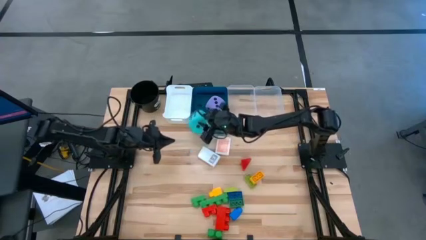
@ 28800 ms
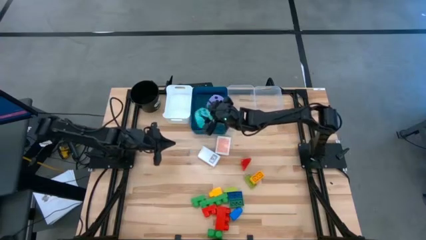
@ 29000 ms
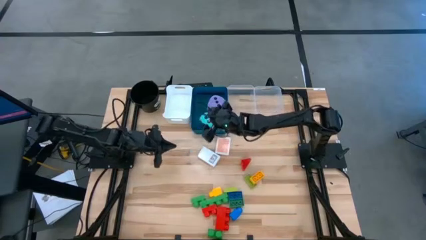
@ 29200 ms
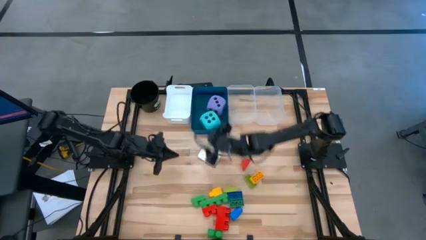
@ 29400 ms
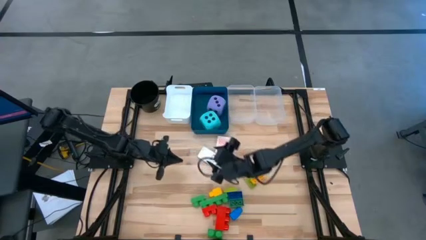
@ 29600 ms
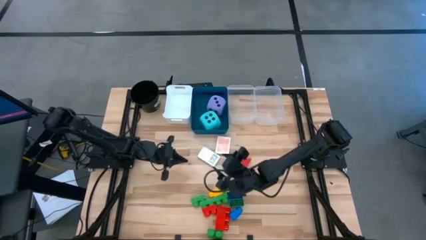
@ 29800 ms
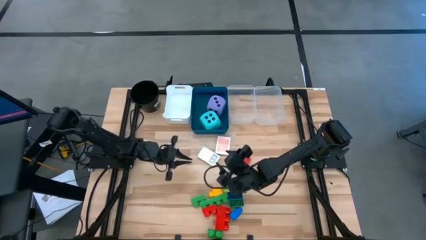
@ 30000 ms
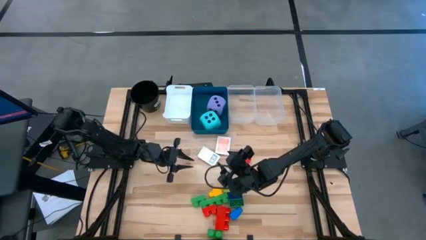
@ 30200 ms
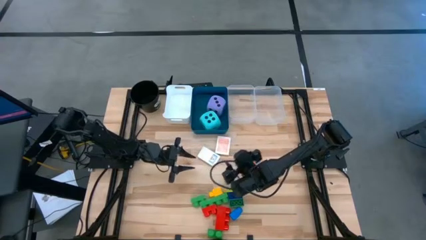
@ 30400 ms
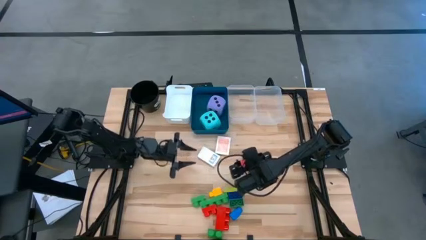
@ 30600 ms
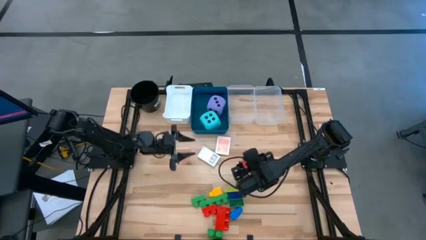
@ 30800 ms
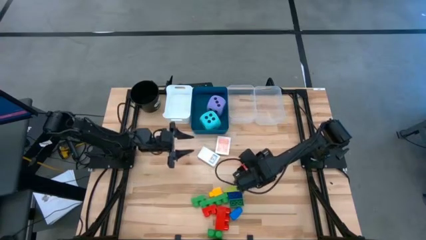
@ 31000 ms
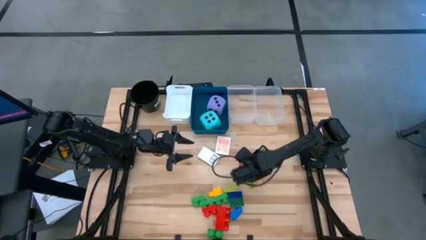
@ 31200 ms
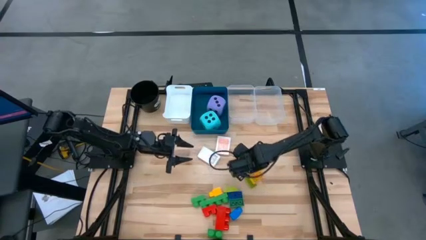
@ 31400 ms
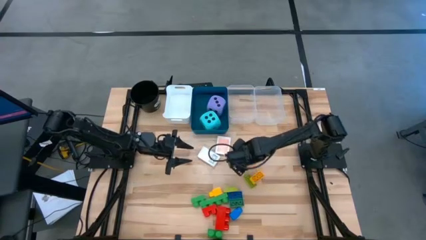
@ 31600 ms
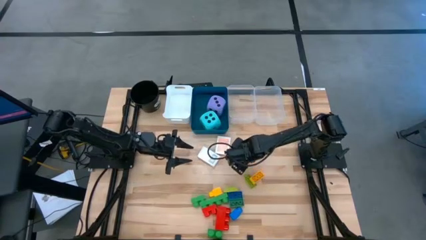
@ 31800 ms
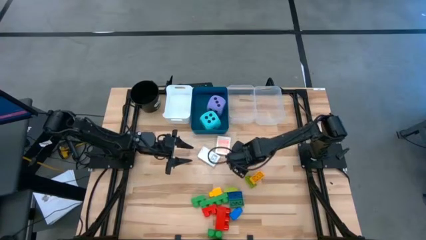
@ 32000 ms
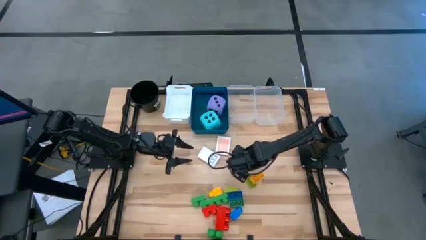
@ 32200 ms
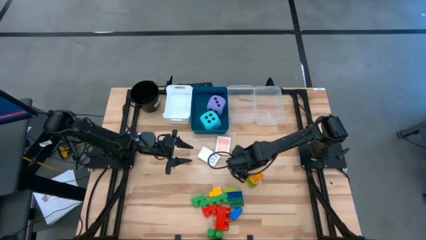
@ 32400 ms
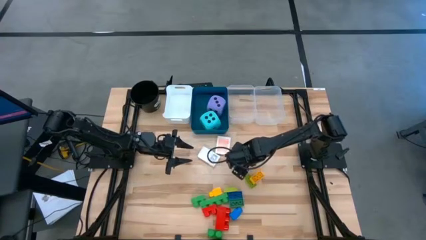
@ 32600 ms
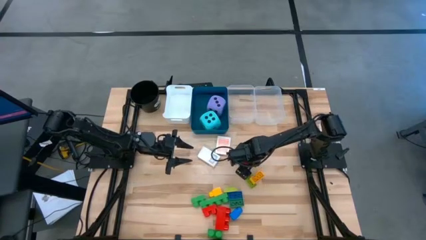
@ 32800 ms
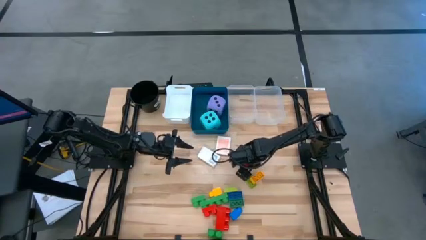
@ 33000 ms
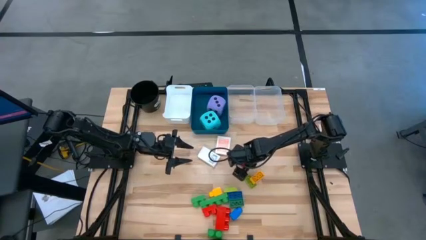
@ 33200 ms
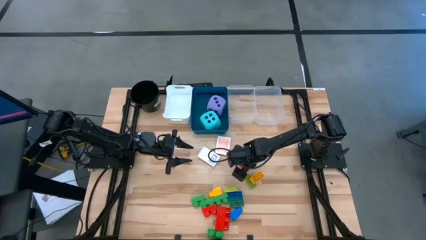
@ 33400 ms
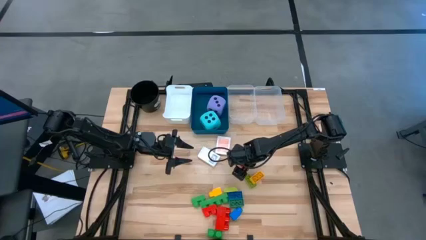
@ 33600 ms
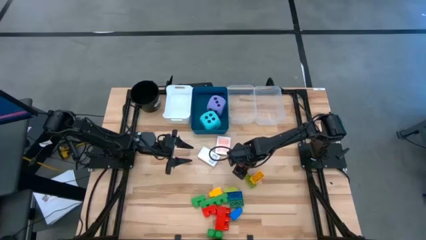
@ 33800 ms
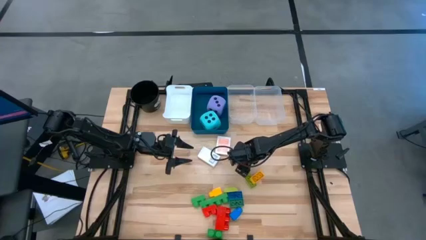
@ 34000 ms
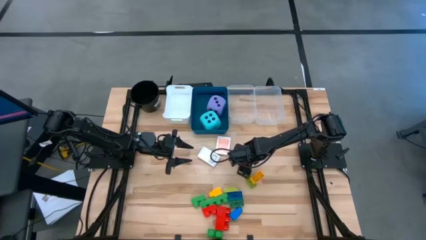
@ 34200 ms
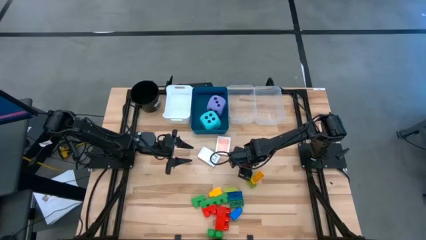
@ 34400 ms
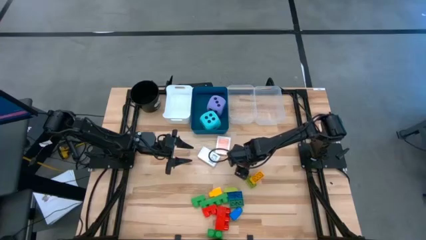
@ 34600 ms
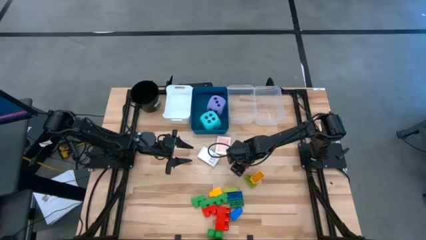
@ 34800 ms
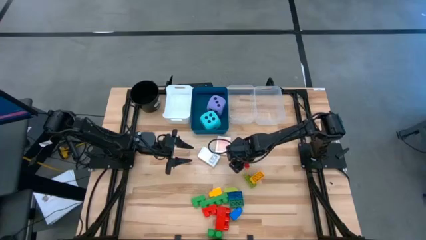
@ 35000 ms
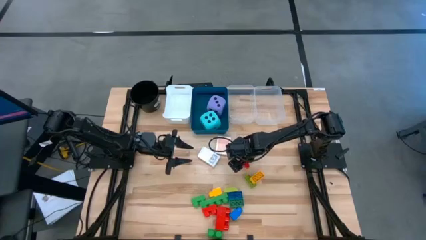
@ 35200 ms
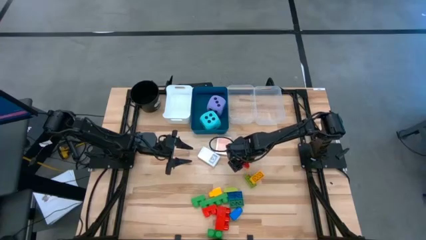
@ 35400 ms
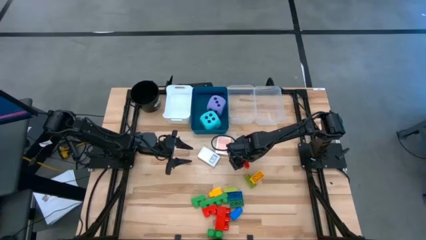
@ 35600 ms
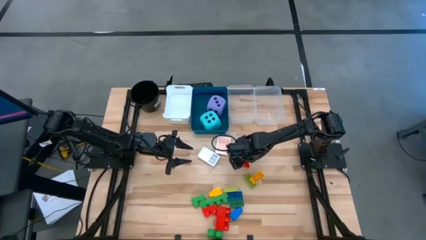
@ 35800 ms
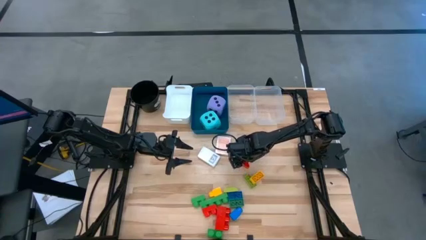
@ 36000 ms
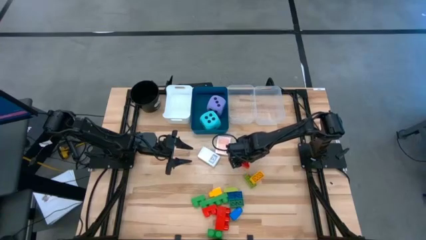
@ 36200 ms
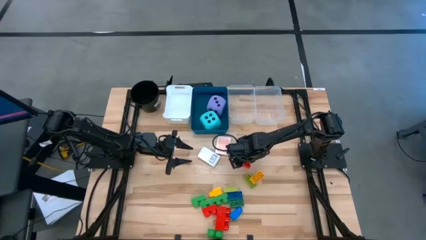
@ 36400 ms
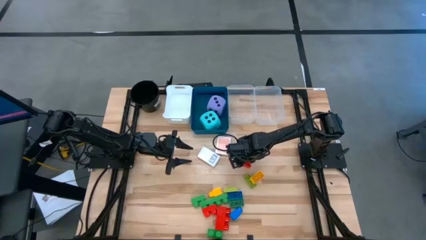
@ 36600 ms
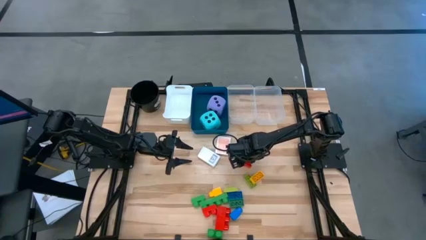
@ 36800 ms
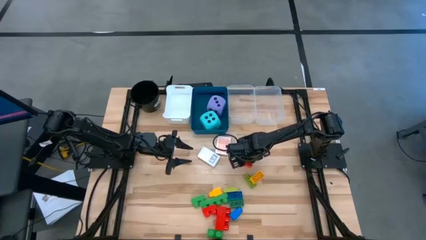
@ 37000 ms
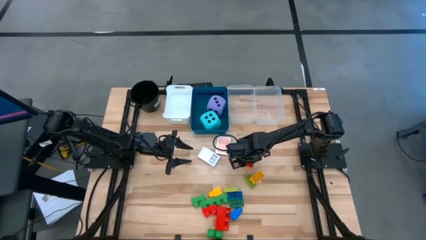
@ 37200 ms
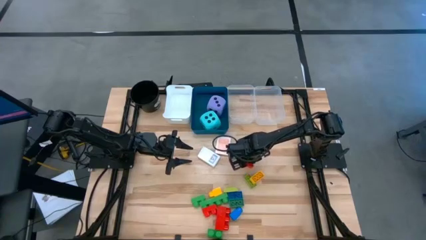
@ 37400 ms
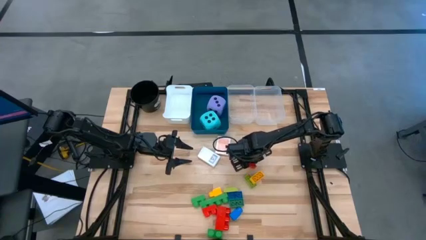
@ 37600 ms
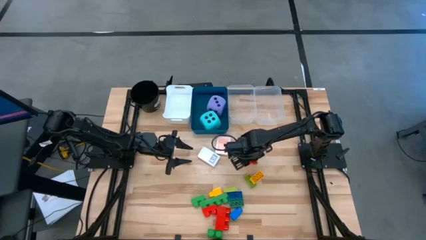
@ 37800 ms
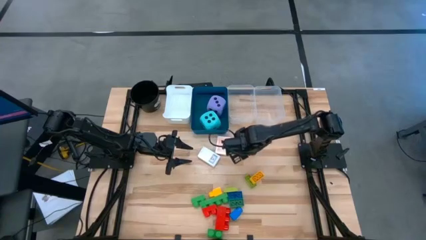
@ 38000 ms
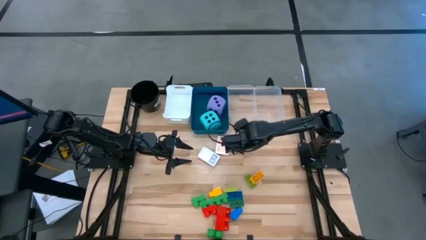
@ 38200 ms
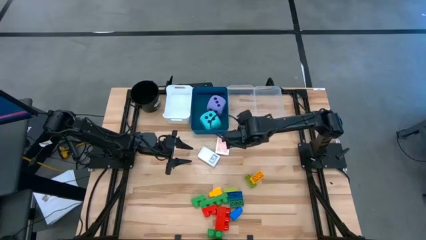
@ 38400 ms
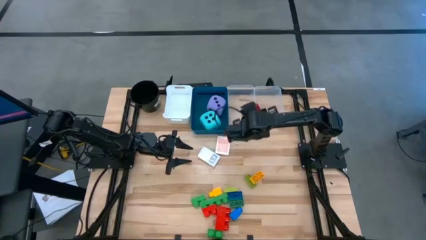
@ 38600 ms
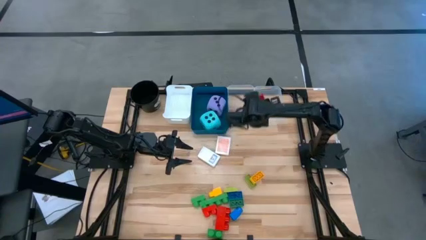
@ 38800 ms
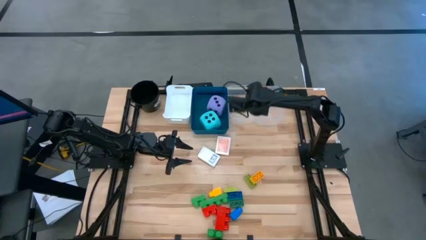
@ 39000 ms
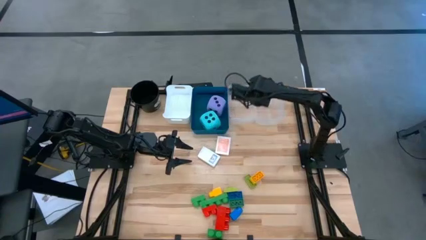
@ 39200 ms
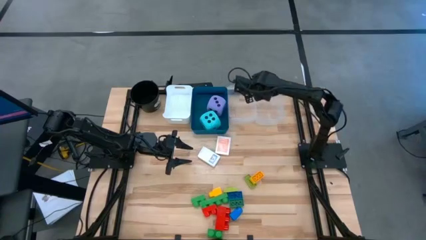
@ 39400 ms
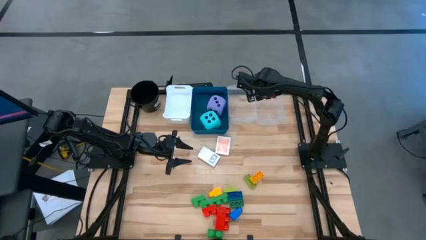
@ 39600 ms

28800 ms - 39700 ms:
Task: Pick & Place Toys
Put the red triangle block into the right transparent bin

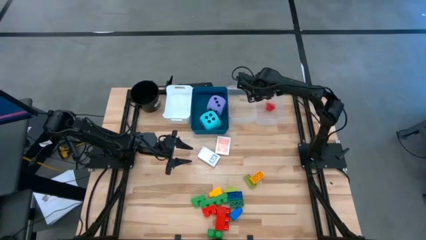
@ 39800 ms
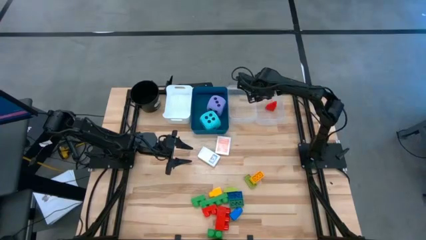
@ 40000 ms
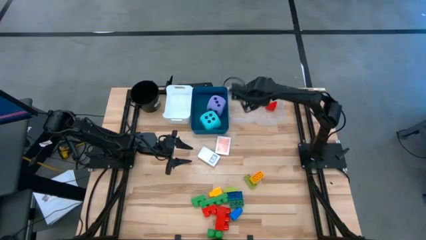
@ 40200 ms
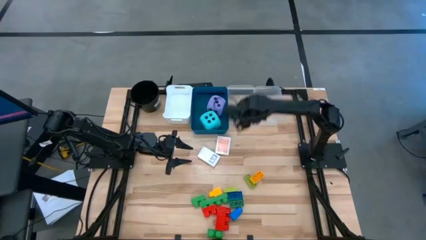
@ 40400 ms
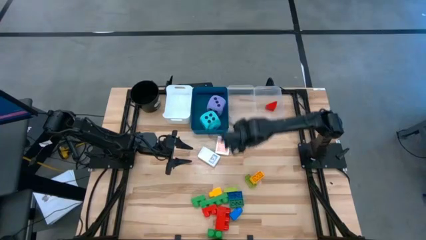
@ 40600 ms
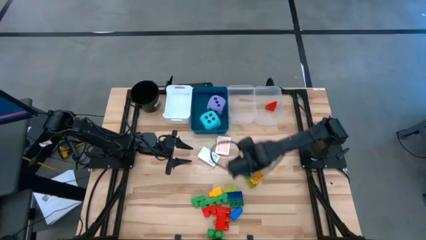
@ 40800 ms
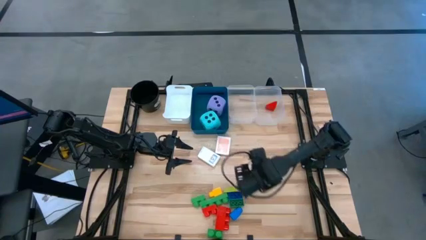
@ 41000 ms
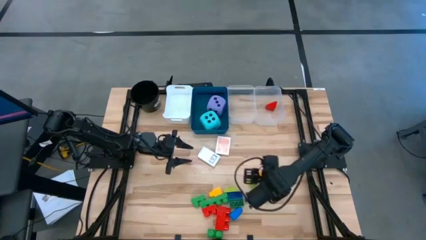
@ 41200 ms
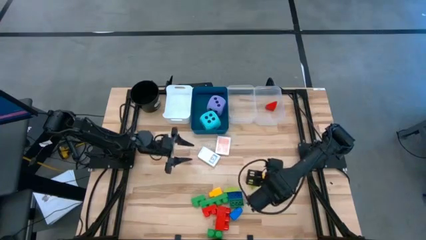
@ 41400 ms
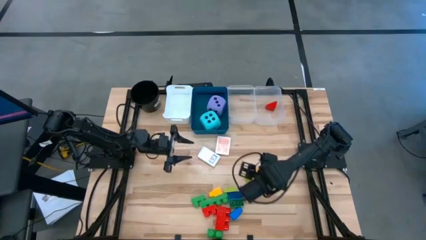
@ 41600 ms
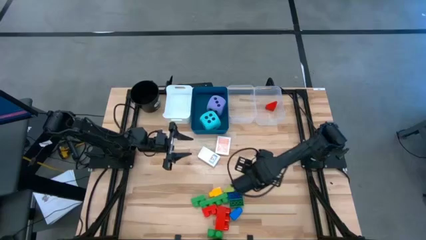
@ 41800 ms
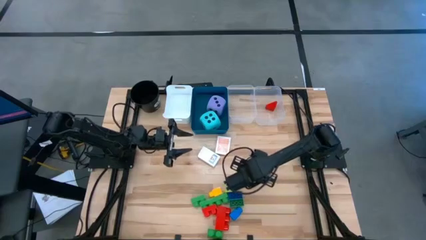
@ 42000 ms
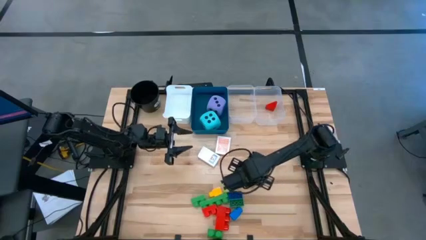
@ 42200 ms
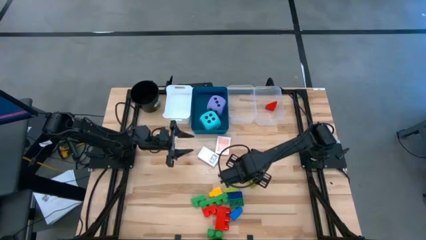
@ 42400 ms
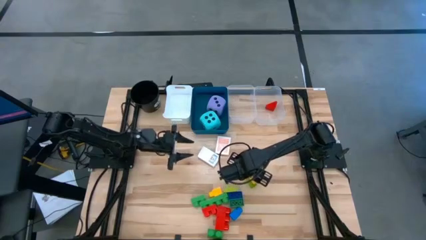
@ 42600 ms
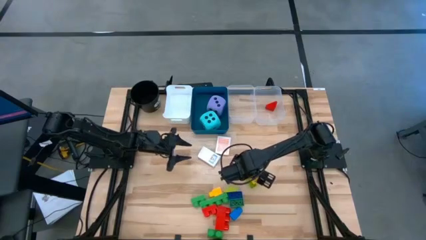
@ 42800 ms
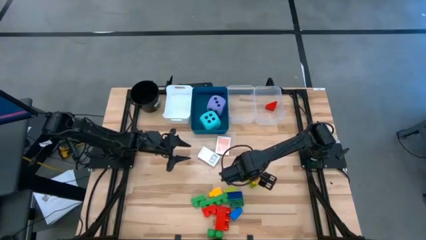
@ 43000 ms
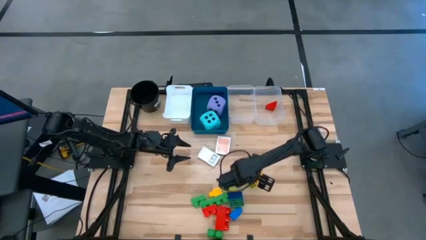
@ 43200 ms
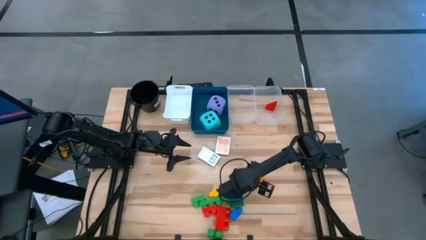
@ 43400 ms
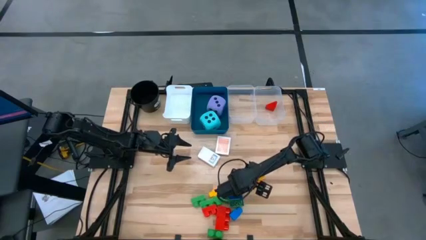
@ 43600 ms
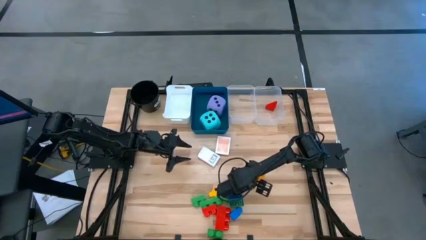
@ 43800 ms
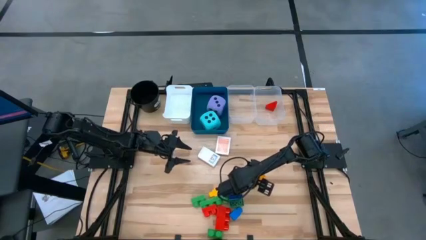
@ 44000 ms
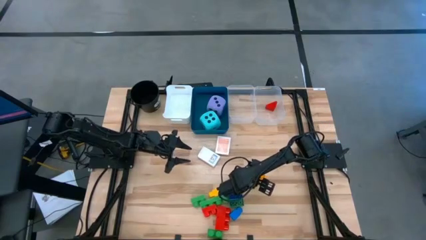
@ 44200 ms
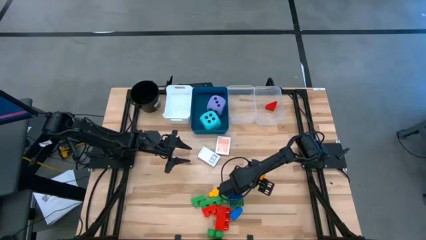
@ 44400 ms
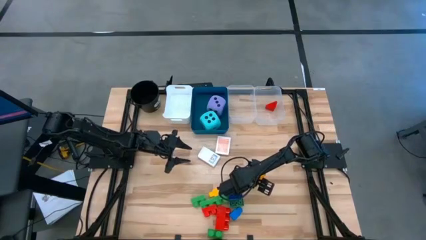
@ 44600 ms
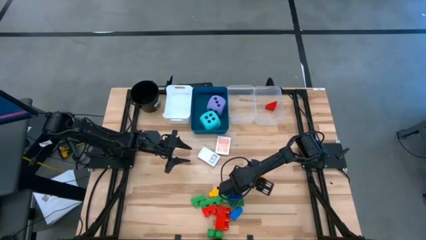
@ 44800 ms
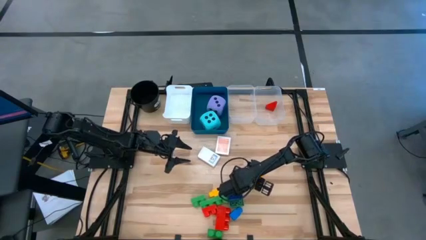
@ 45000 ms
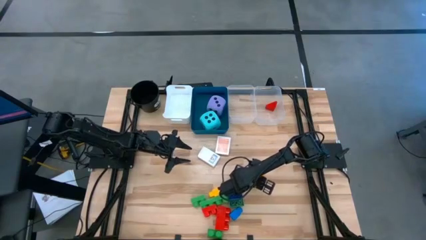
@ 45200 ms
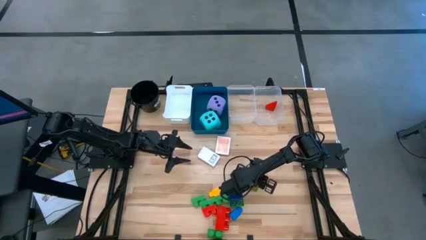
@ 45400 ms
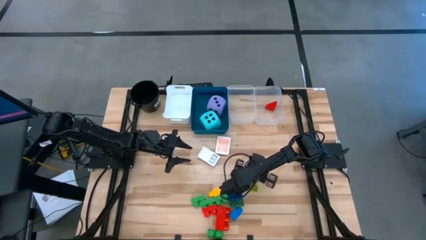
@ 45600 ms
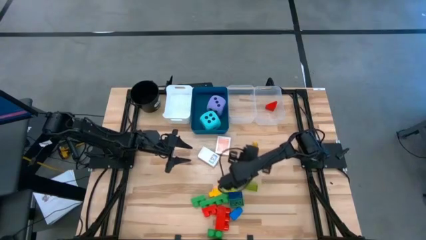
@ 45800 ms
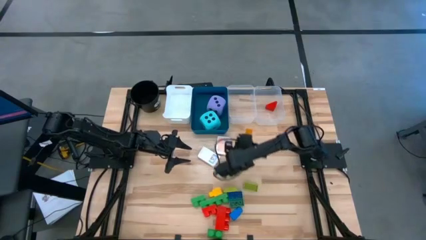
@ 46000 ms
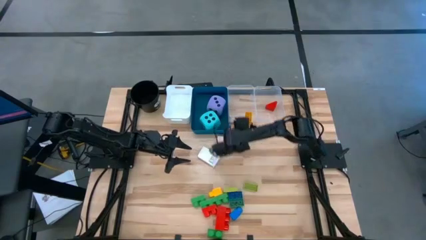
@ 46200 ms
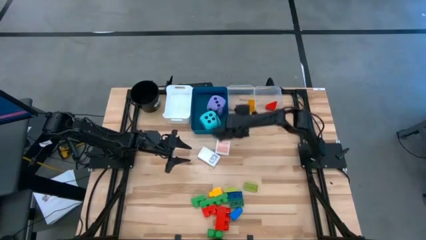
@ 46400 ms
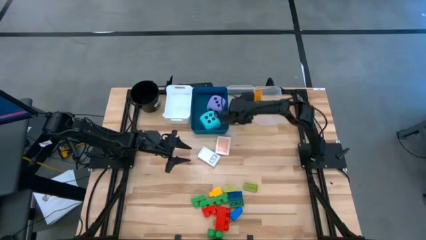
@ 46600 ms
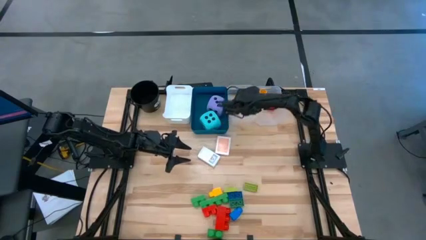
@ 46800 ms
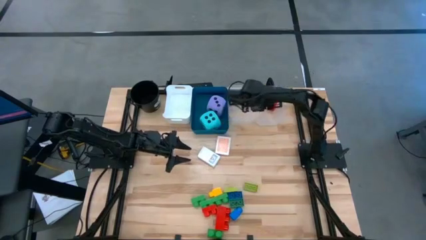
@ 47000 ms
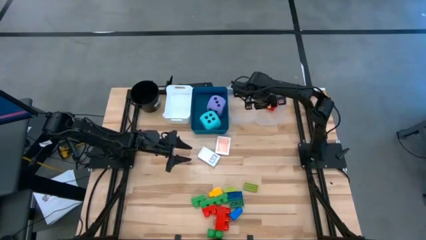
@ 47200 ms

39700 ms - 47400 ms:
Put the large yellow game piece into the right transparent bin
